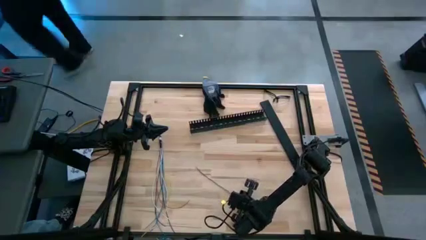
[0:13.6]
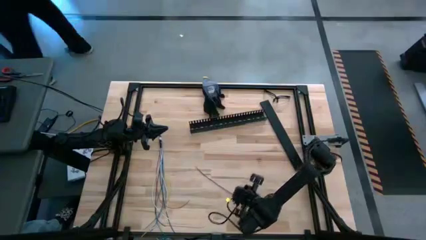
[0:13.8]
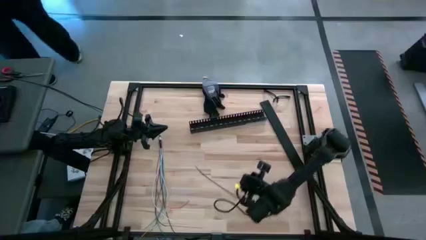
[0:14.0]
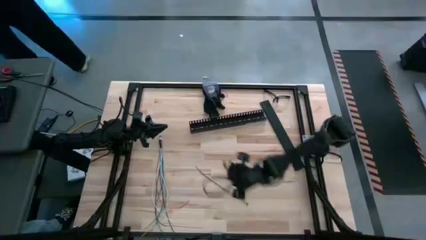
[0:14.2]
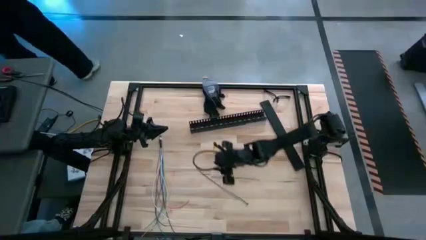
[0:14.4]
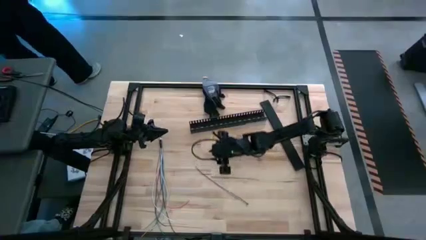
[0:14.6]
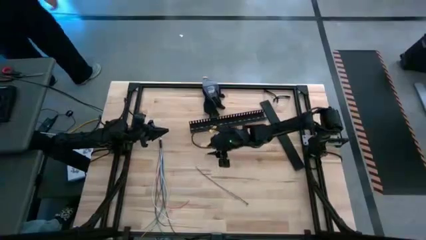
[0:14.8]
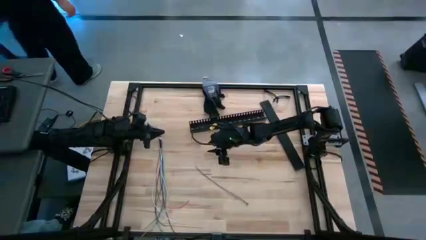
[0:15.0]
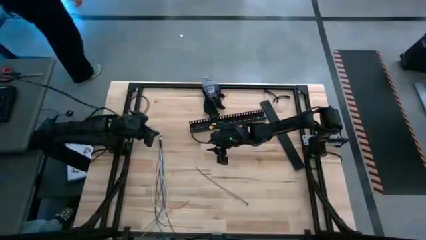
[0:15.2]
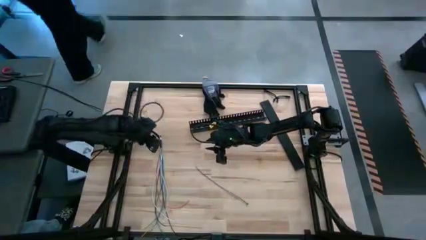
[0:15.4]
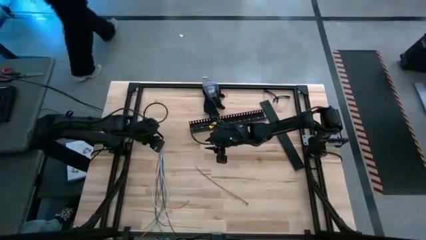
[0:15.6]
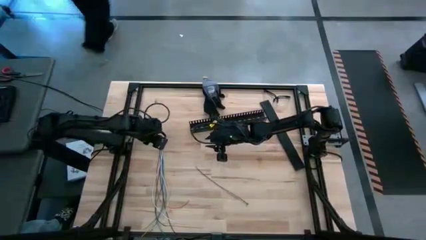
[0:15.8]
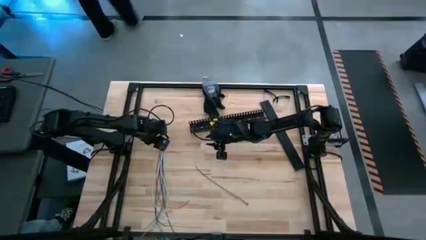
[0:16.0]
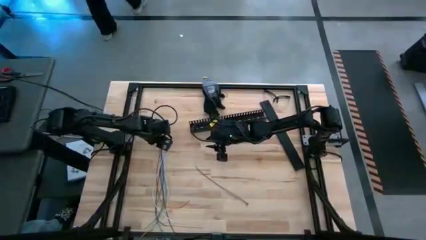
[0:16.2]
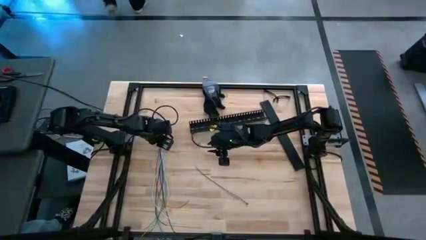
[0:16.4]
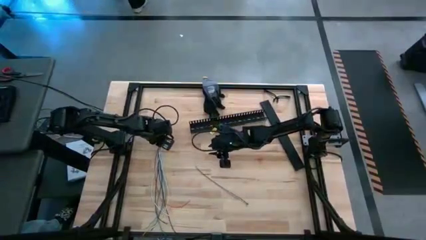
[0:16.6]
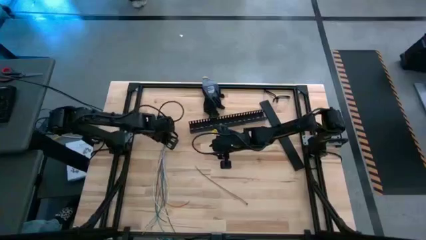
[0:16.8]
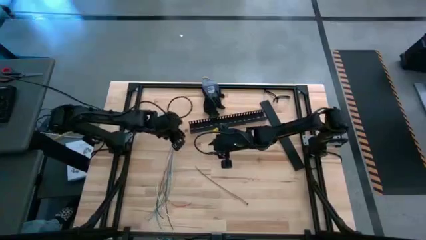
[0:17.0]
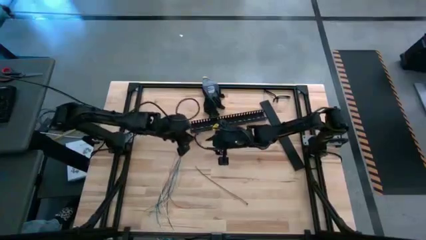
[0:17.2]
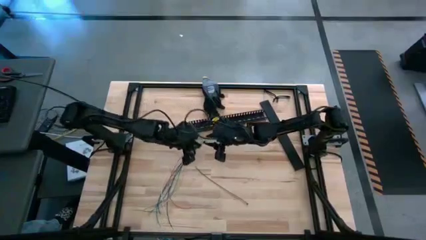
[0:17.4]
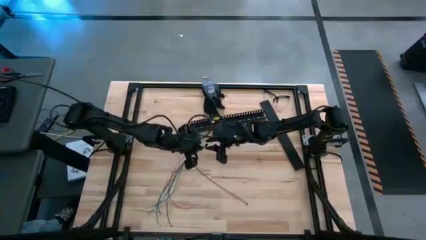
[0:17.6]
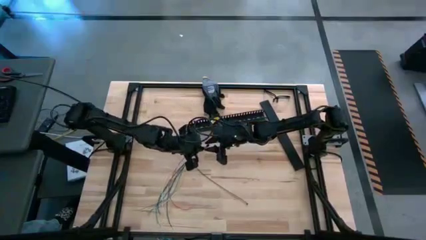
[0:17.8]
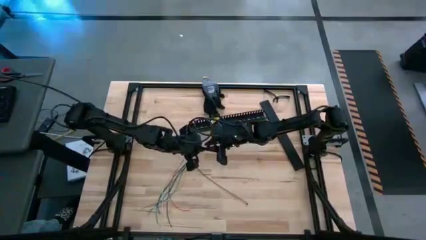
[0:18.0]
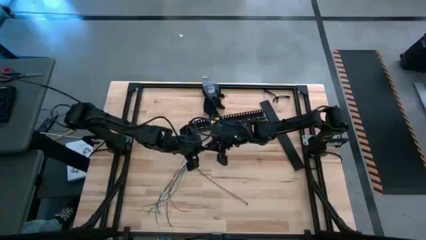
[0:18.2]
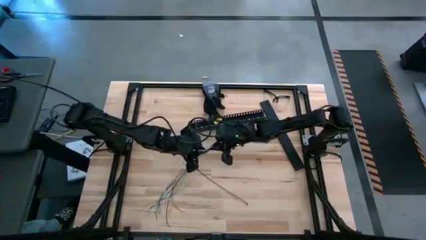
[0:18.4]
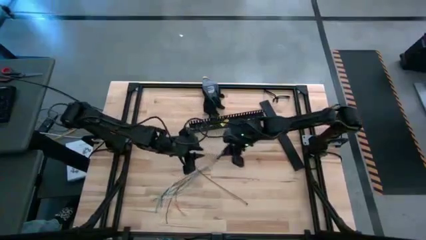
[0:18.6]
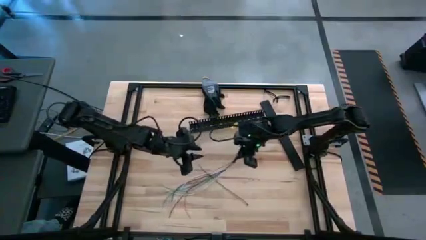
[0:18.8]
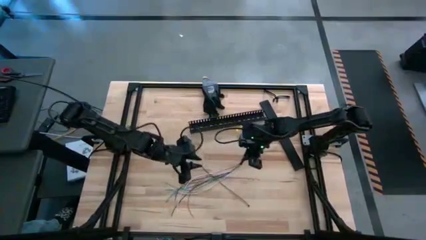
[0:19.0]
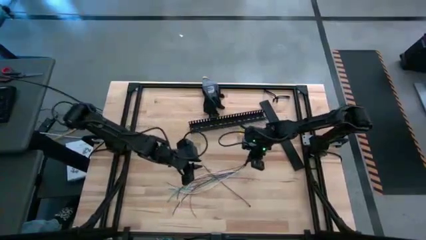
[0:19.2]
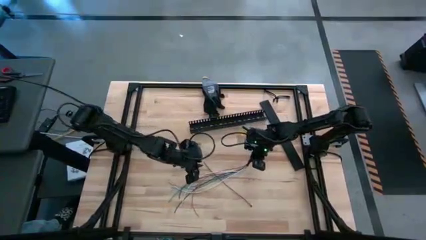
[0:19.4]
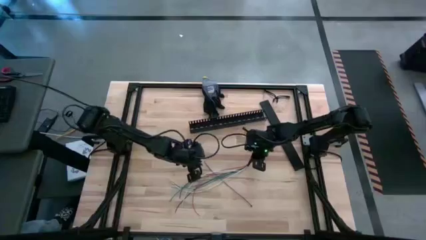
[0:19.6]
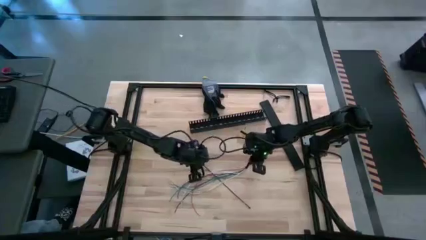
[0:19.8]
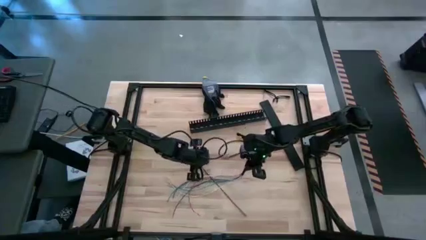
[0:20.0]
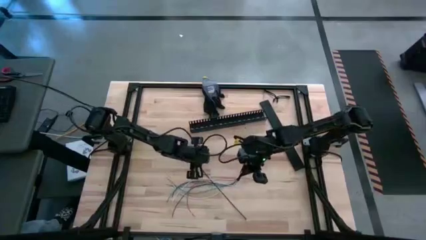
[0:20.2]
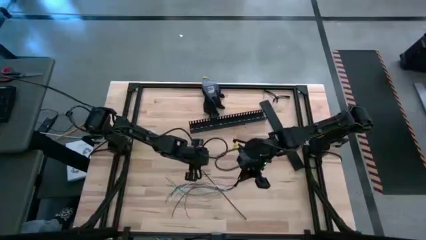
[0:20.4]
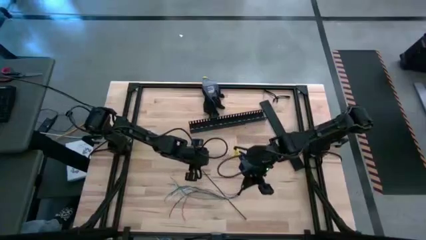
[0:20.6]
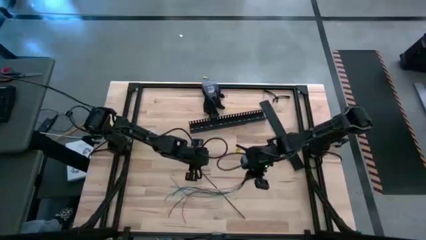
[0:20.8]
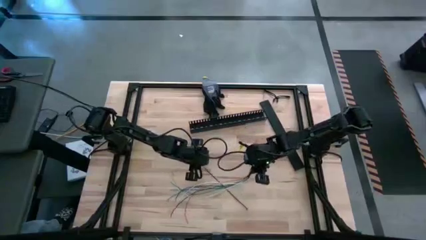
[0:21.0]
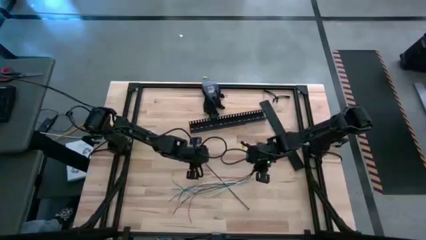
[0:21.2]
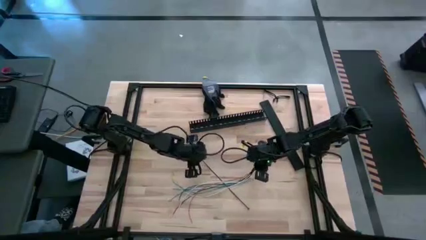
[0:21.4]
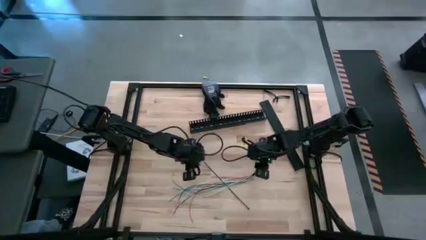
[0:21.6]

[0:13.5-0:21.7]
Task: Ziptie cables
Move the colored loose cables to the bottom center of the table

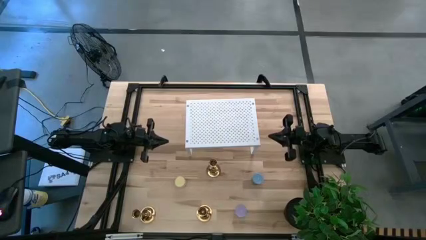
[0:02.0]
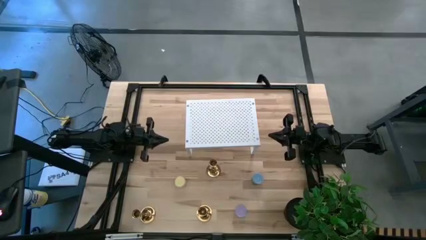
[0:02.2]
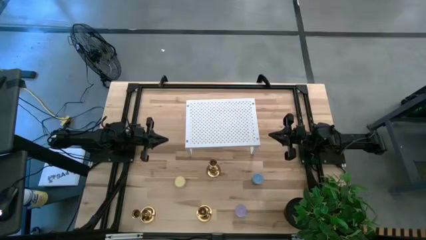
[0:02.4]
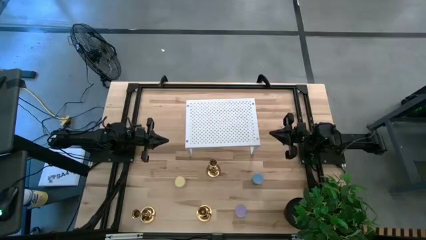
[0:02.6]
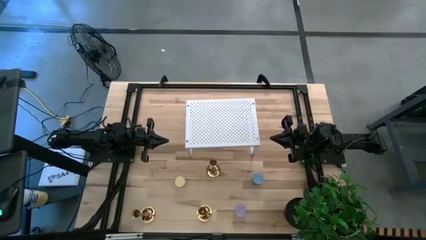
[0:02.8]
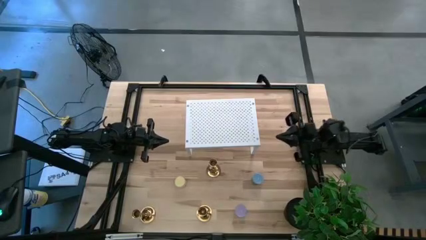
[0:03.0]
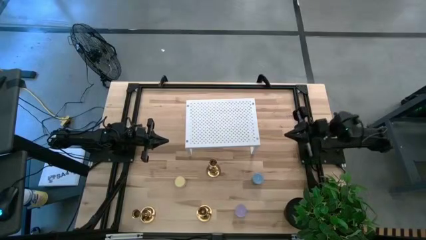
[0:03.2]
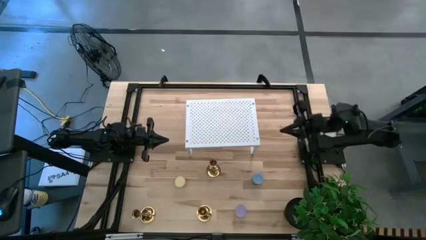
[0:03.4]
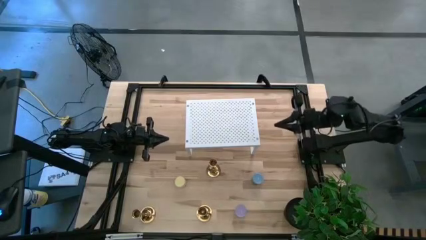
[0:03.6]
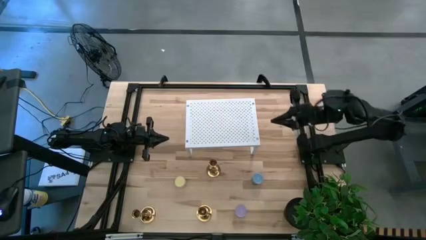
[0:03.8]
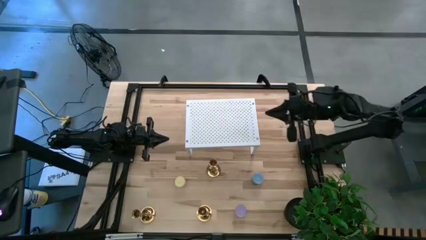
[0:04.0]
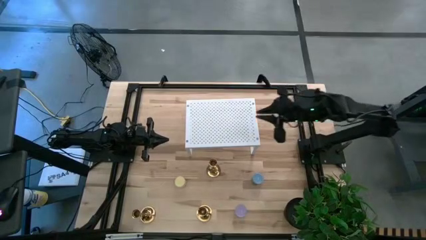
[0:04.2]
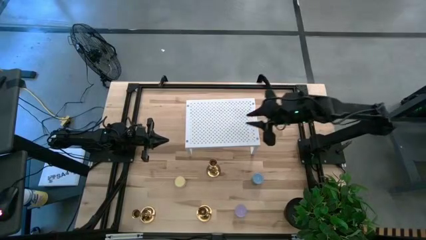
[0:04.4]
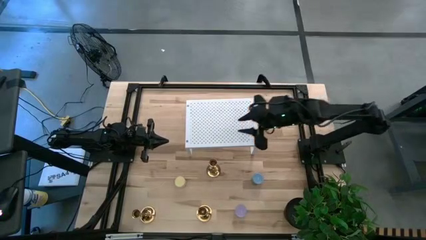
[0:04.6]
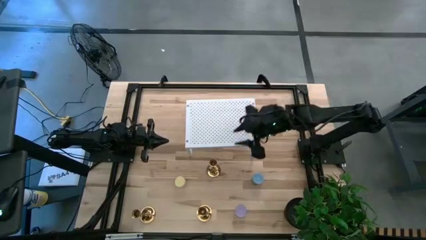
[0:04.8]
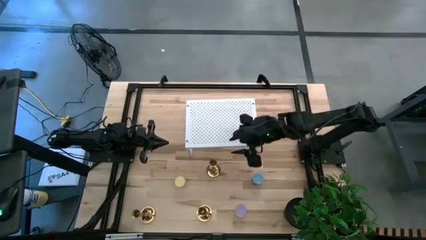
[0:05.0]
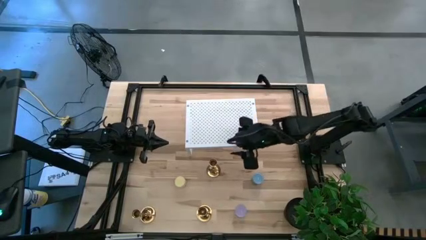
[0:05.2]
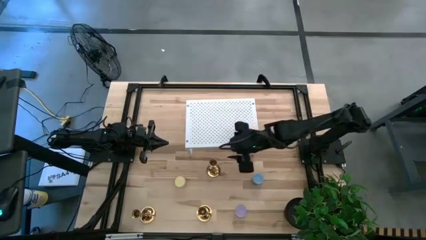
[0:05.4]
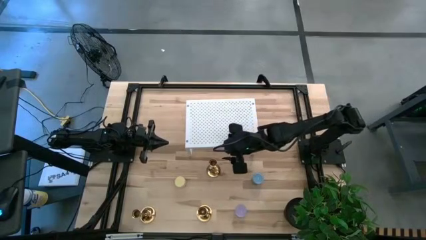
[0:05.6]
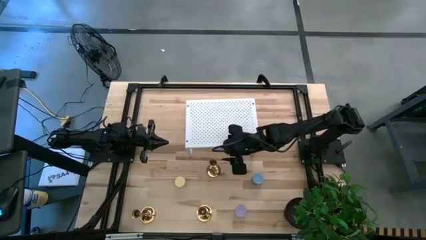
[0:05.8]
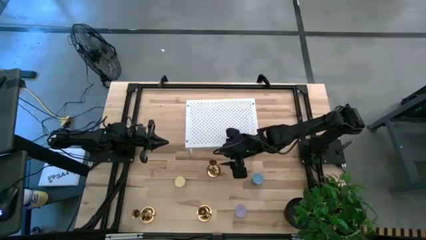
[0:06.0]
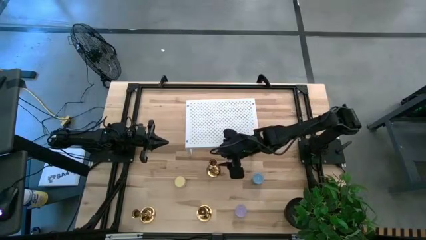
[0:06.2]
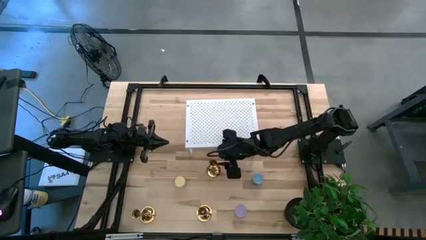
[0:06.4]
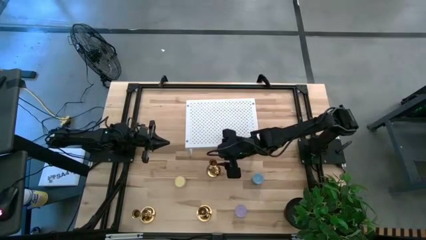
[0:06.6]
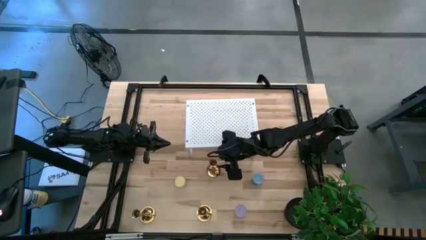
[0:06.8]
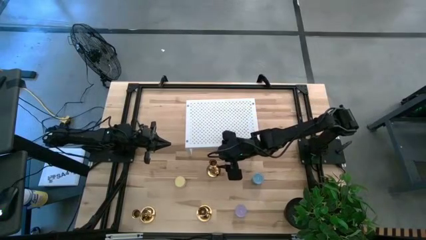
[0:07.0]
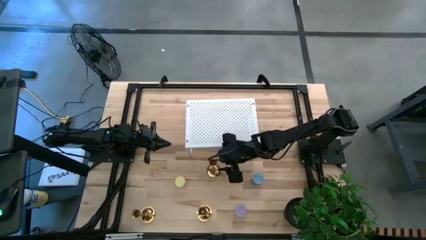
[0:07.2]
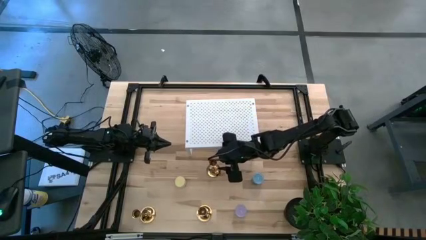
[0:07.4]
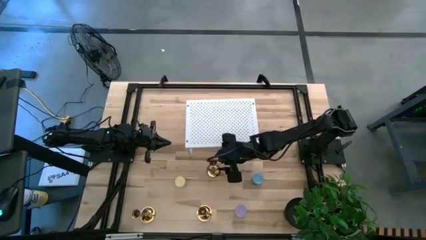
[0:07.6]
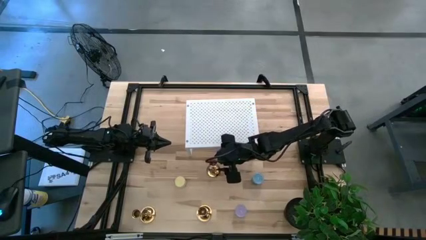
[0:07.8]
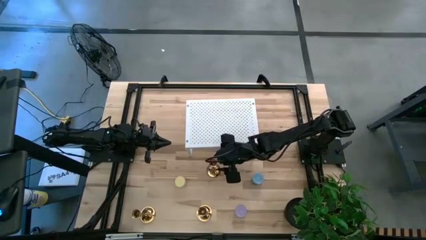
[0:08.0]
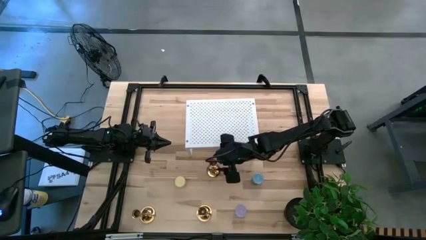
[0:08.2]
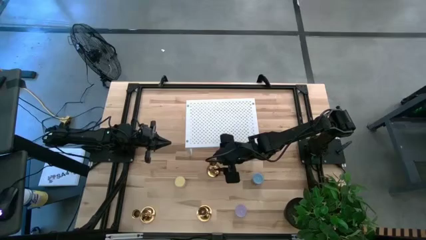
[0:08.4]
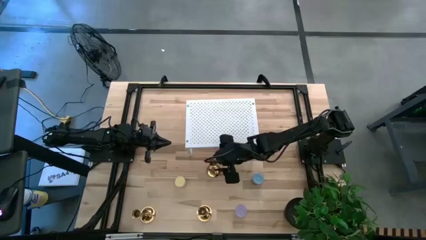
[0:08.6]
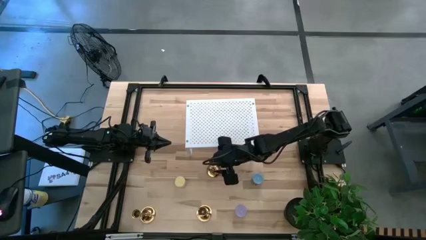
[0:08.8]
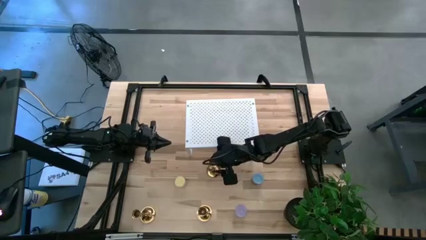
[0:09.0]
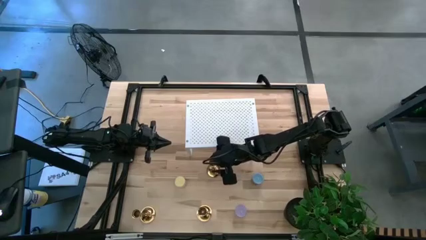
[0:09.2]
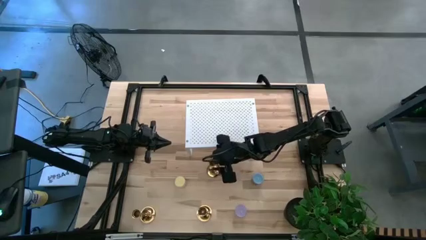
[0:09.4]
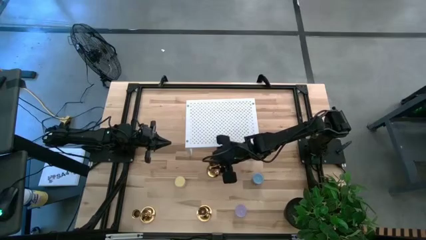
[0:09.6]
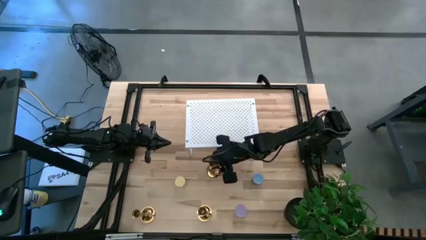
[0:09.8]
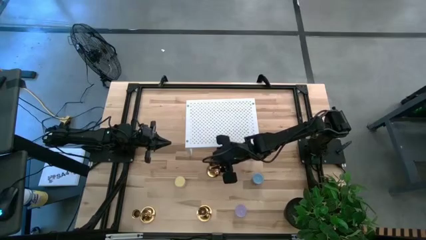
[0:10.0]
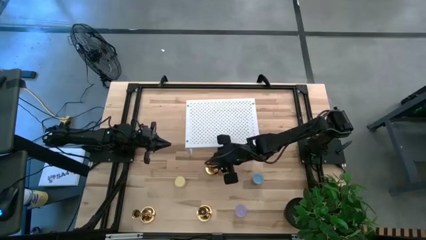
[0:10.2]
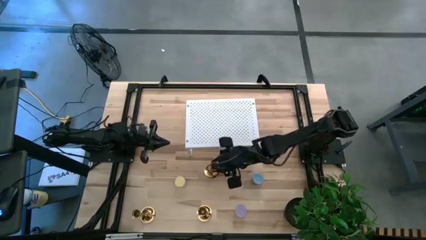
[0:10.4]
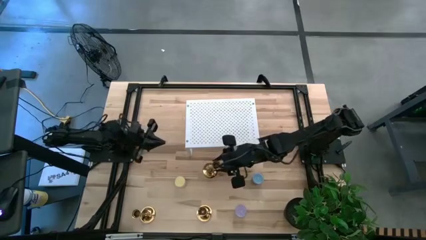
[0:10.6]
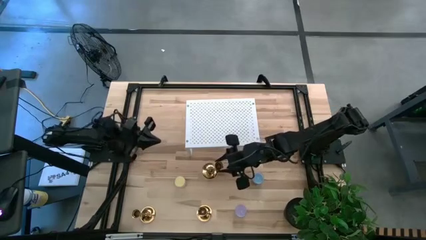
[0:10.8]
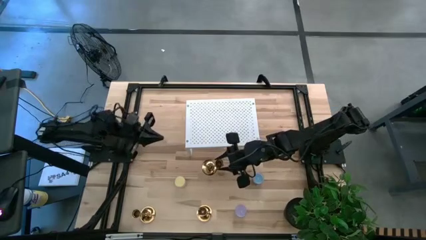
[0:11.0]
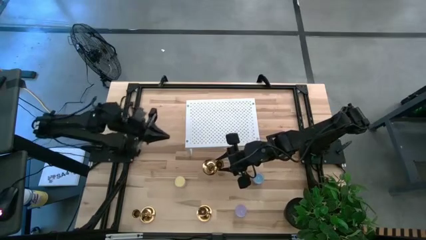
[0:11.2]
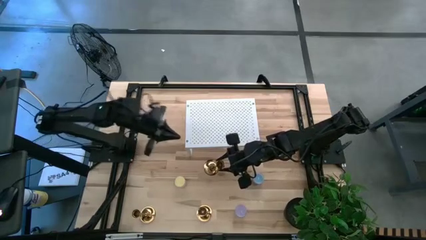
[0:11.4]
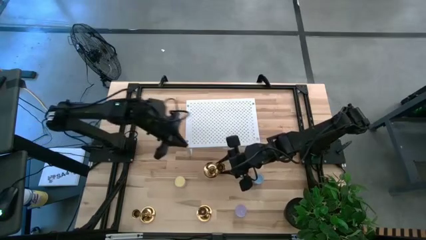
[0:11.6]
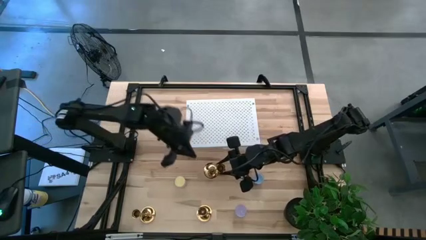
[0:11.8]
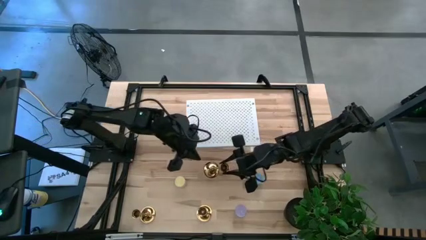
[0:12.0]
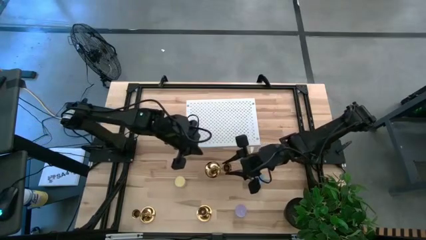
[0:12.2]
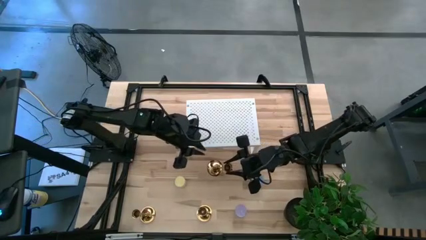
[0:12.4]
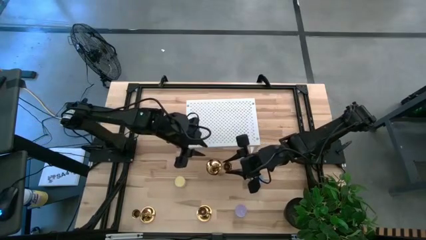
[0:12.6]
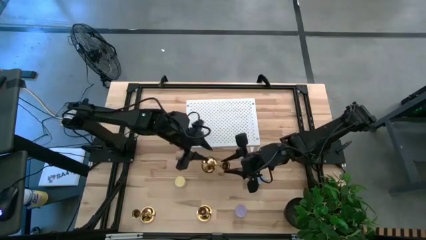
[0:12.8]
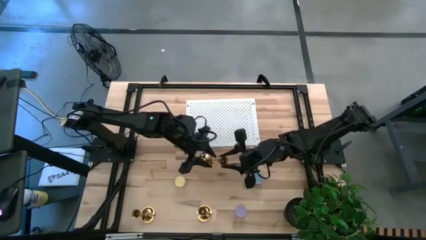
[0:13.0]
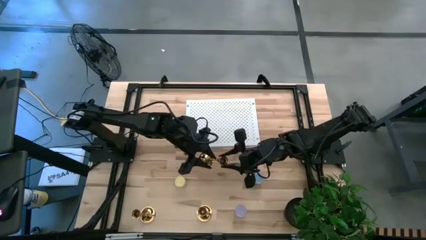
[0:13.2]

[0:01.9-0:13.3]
Task: Pick & Place candle stick holders
Put the top yellow candle holder on the shelf
